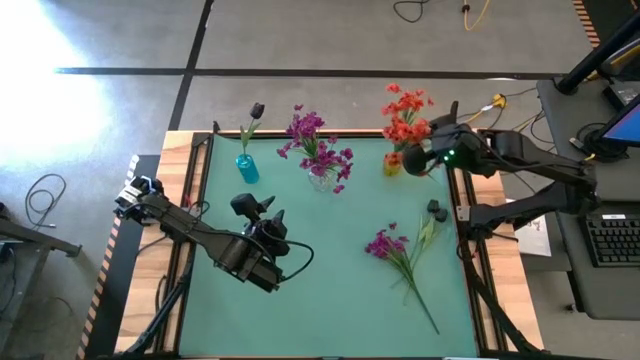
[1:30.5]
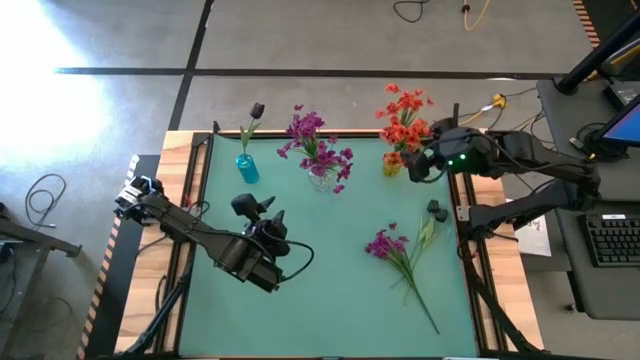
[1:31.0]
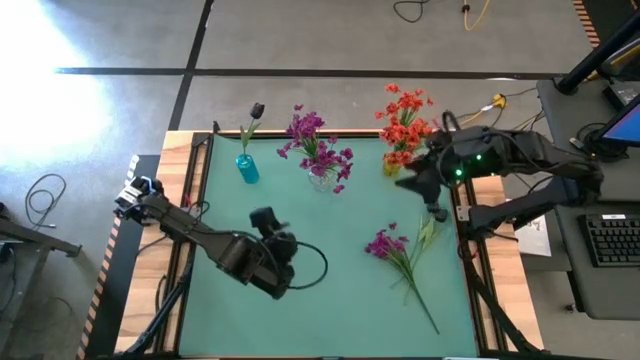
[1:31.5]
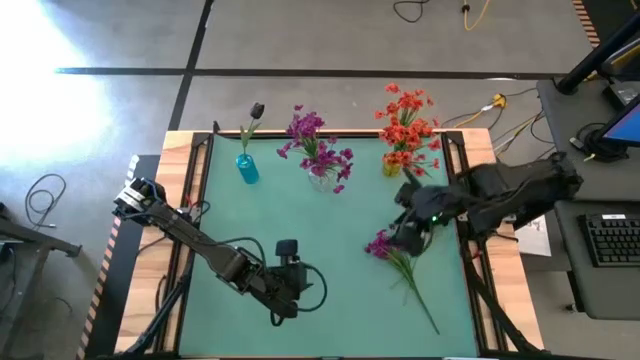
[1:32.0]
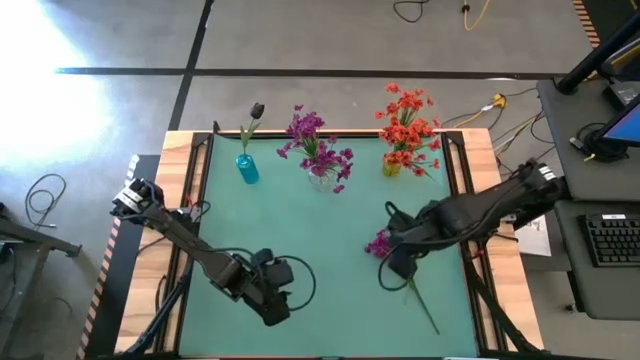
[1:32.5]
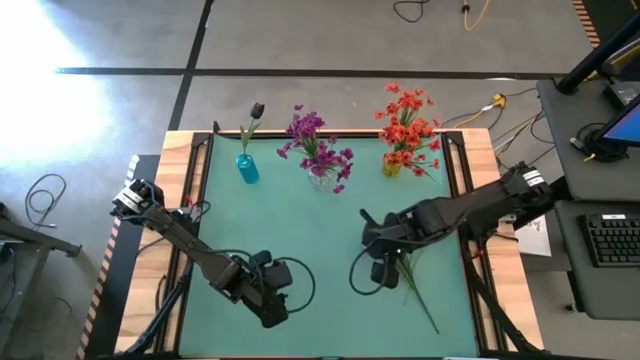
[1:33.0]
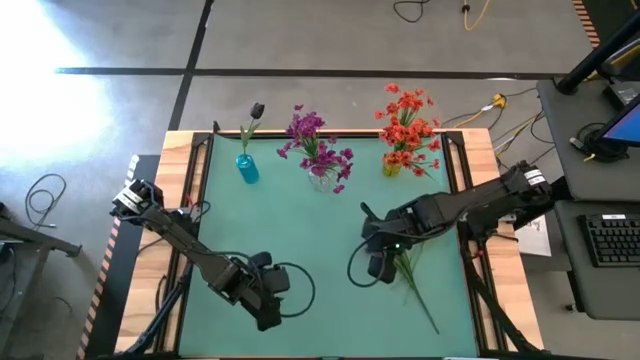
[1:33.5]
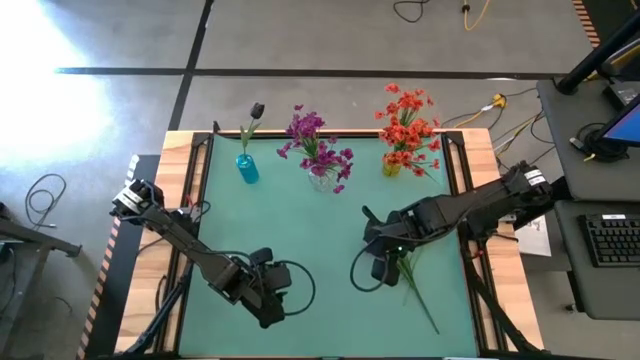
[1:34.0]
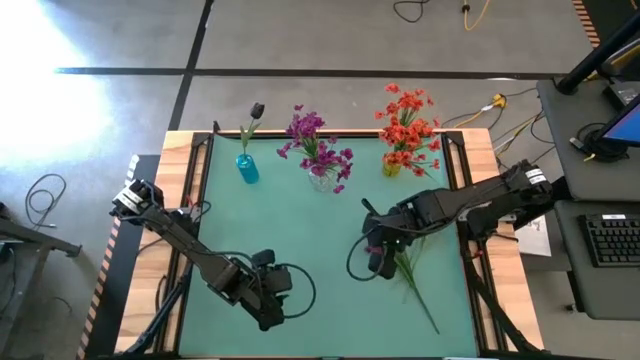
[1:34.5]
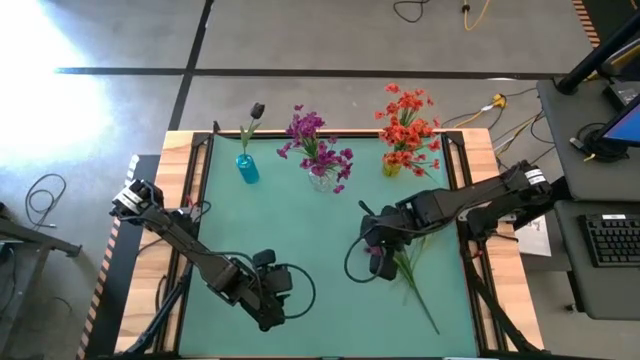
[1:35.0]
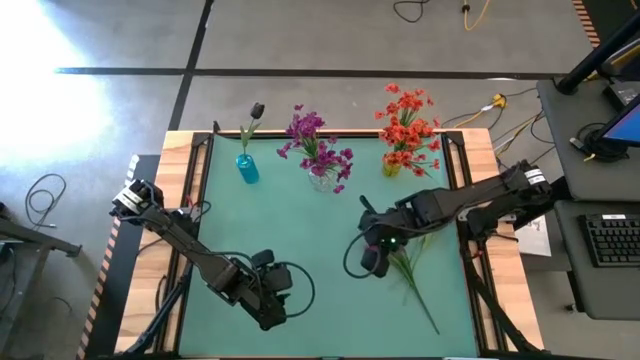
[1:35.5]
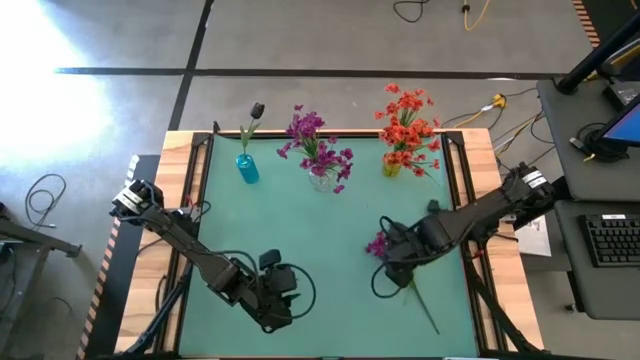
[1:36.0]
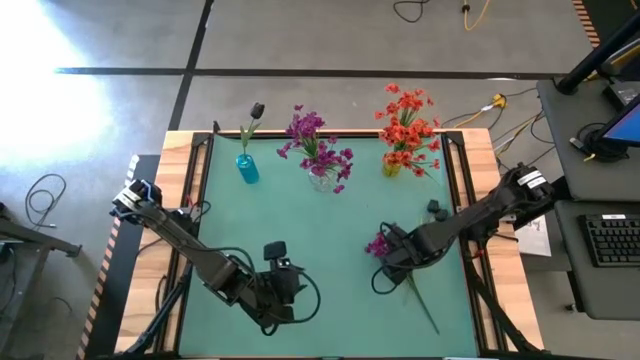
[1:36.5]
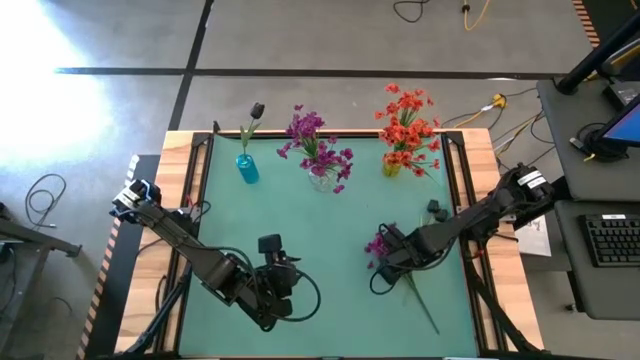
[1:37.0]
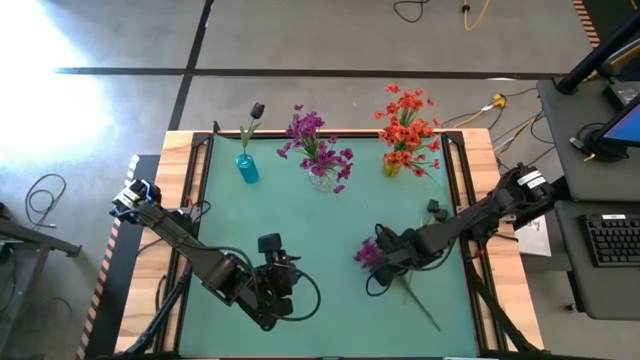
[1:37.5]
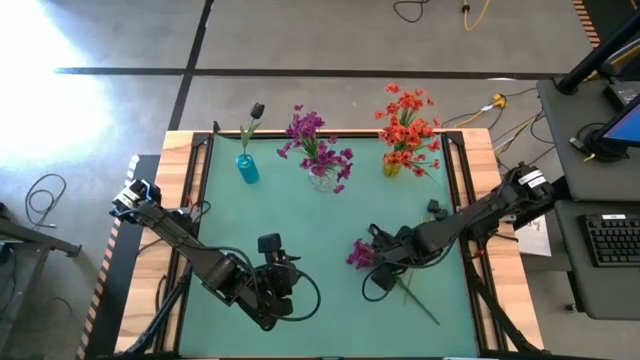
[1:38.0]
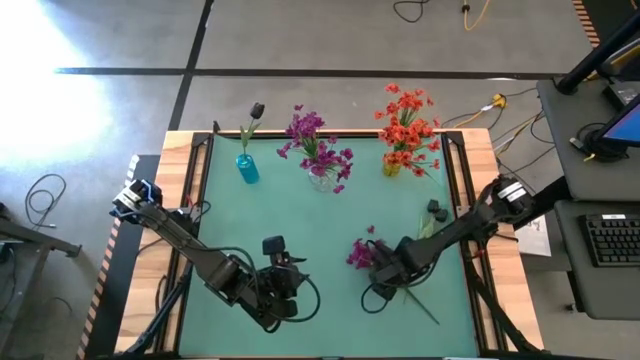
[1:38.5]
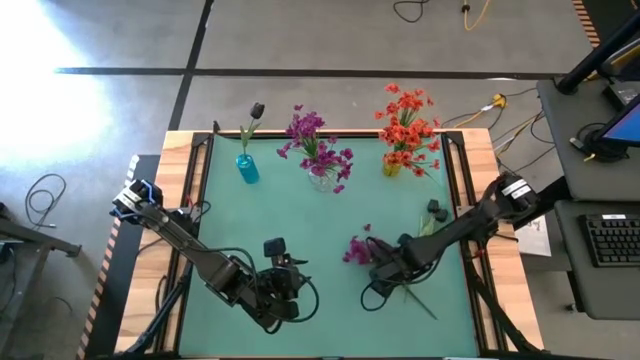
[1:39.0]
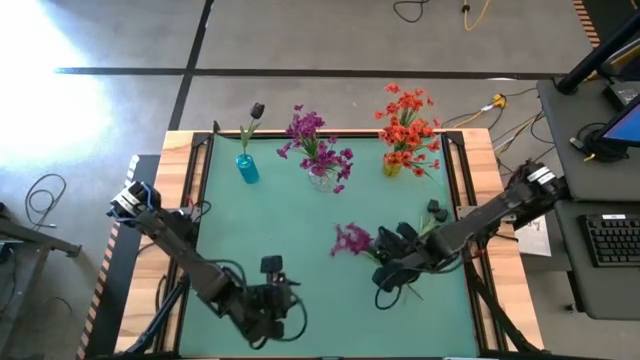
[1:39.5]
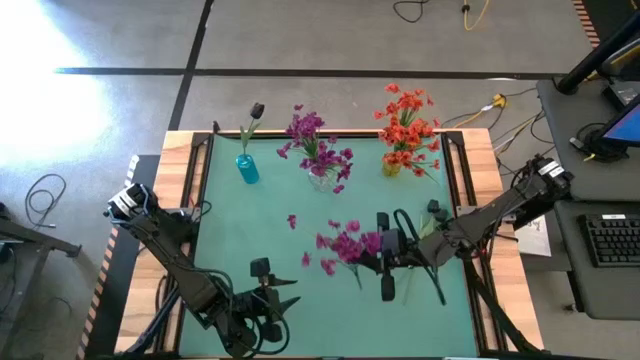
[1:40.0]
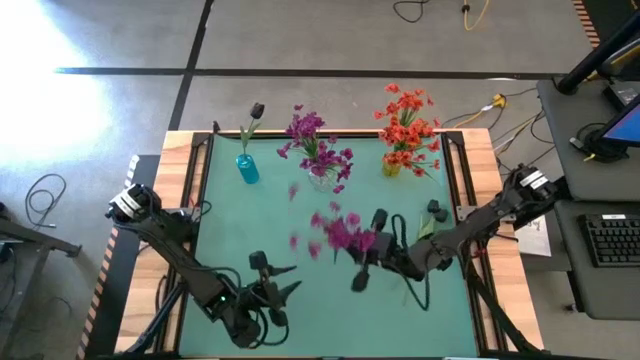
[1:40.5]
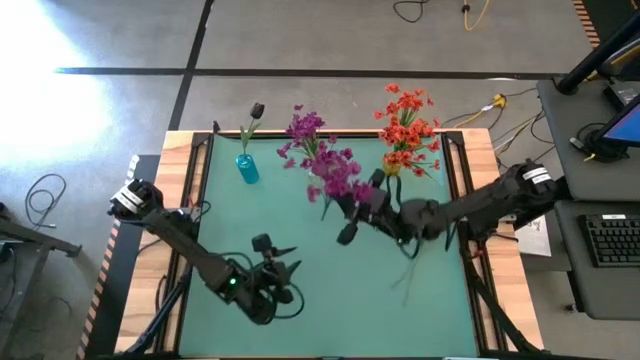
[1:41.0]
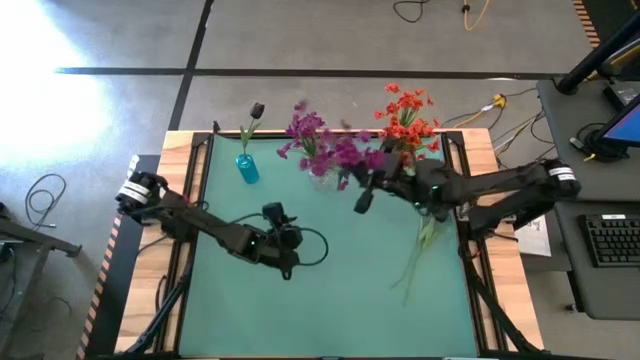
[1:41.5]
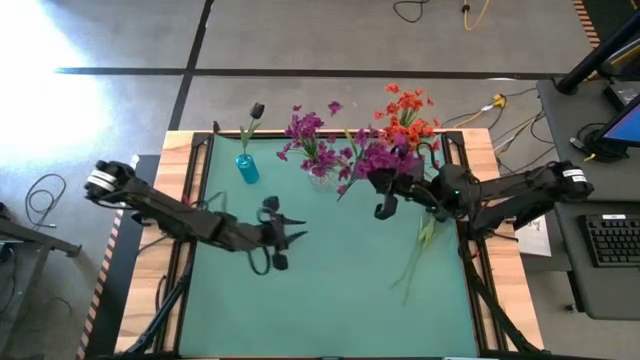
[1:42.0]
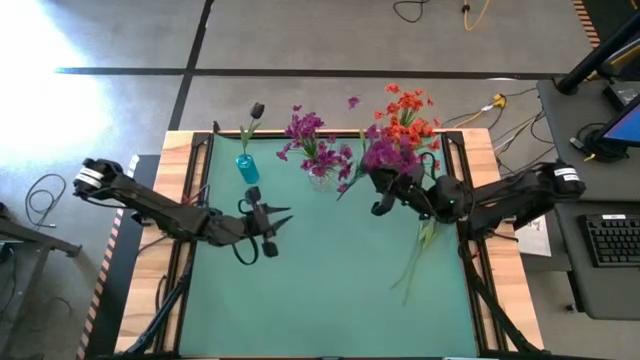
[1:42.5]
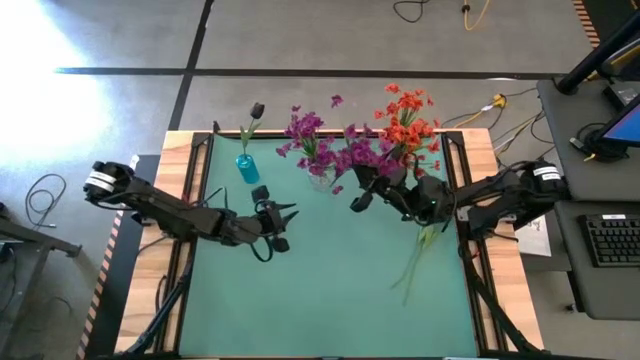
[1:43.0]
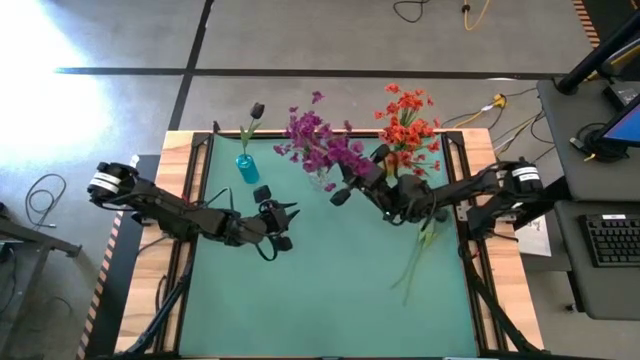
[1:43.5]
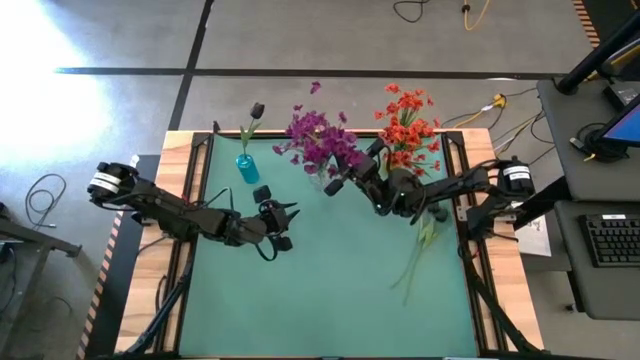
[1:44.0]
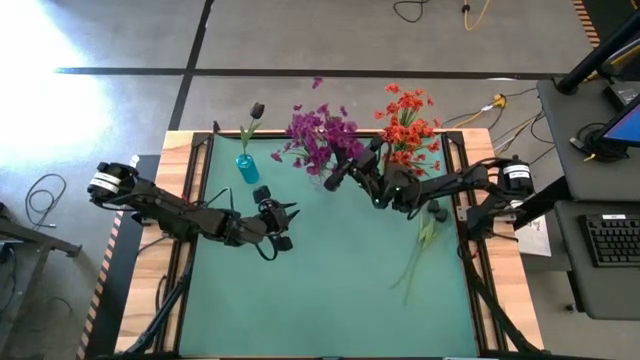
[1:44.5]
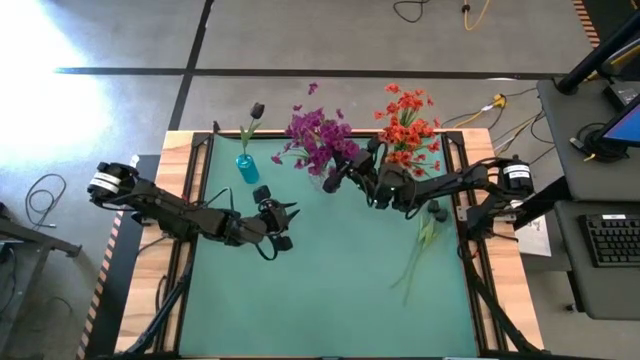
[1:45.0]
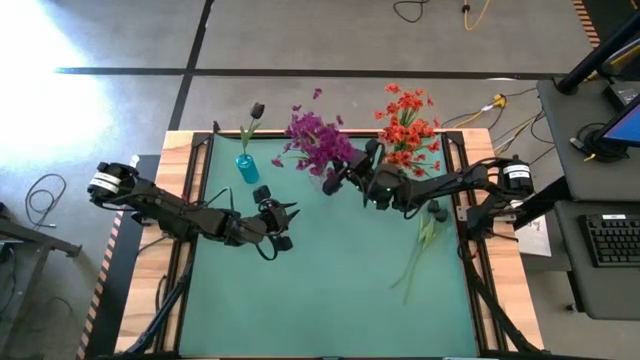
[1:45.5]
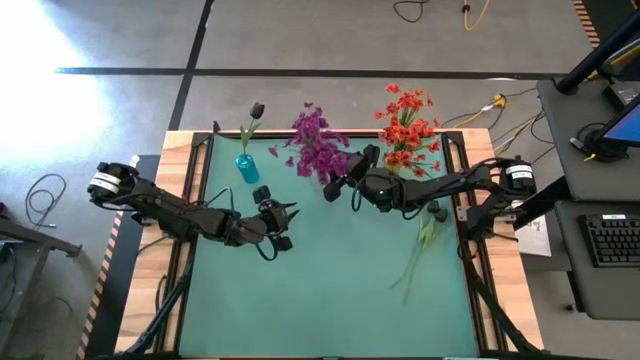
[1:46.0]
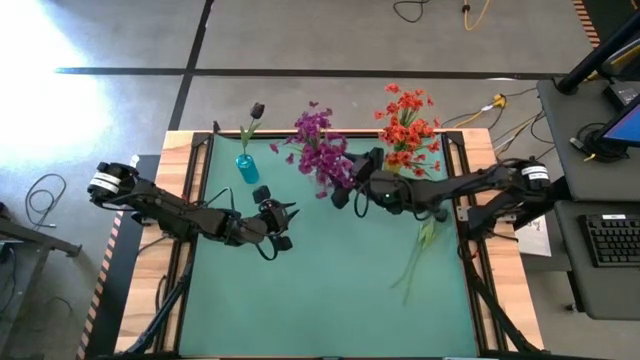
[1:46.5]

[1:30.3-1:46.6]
Task: Sort flowers into vase by color
Put the violet flowers into the transparent flower vase

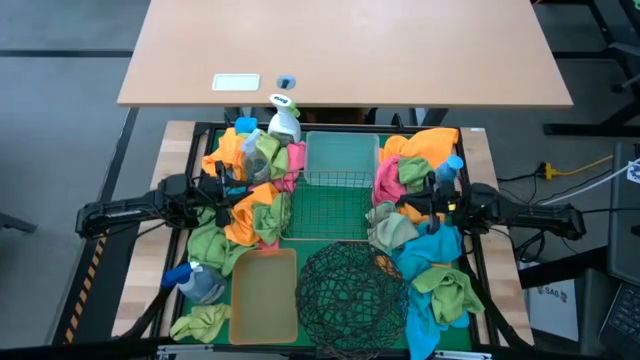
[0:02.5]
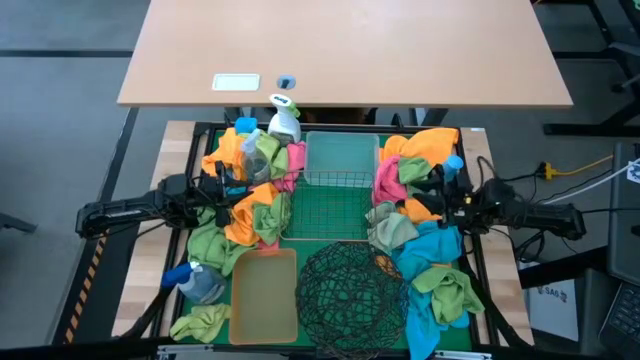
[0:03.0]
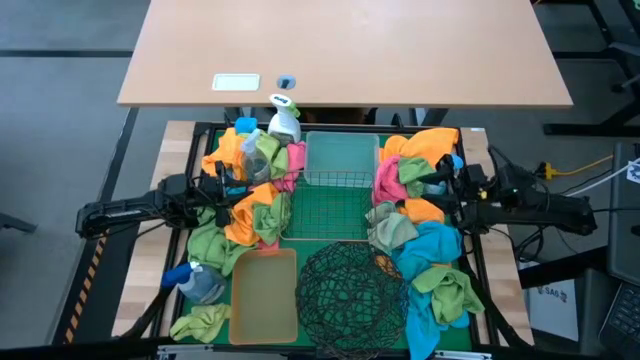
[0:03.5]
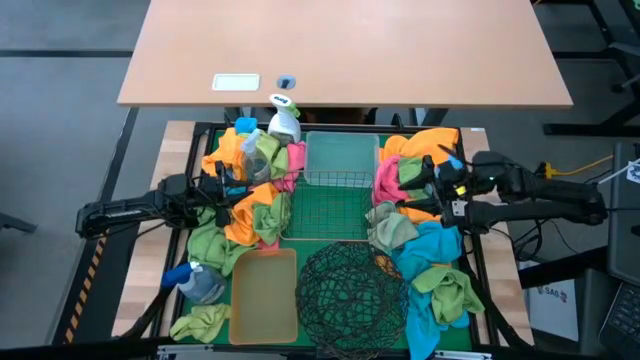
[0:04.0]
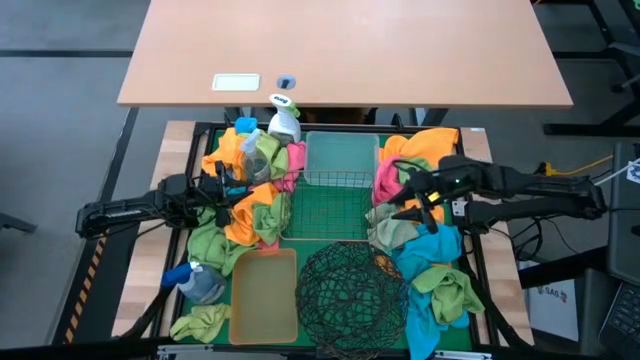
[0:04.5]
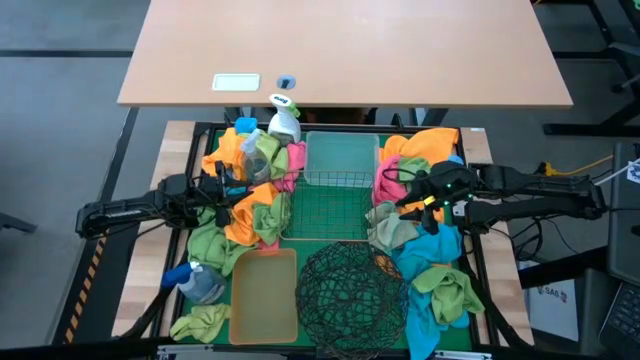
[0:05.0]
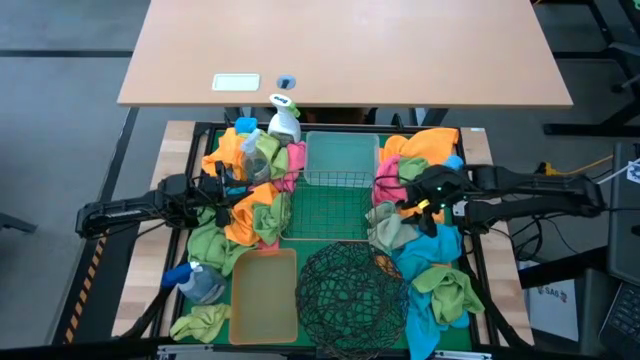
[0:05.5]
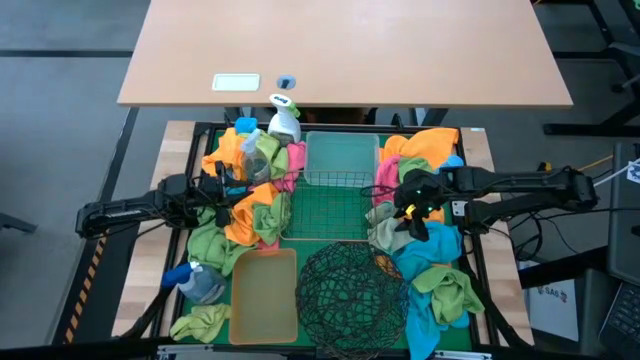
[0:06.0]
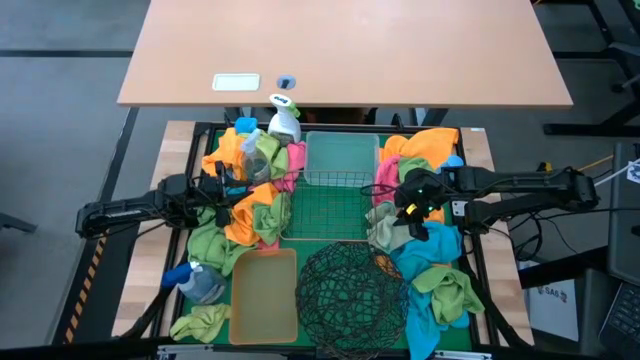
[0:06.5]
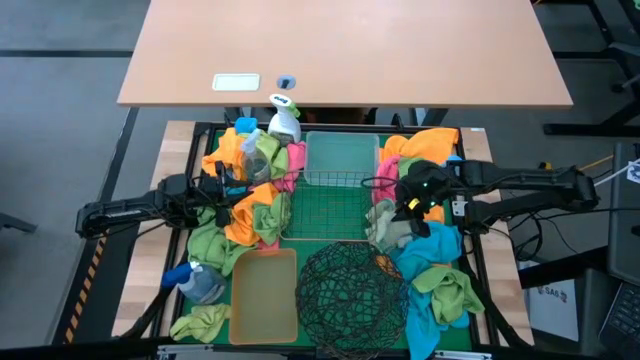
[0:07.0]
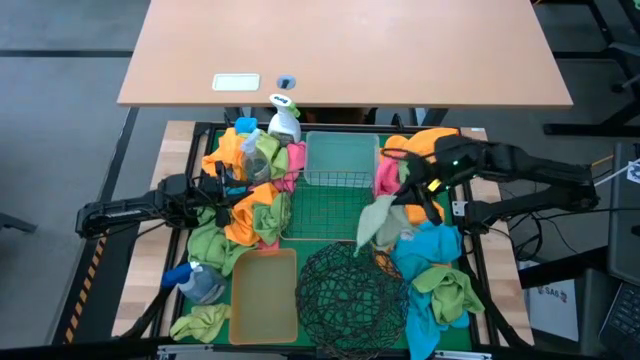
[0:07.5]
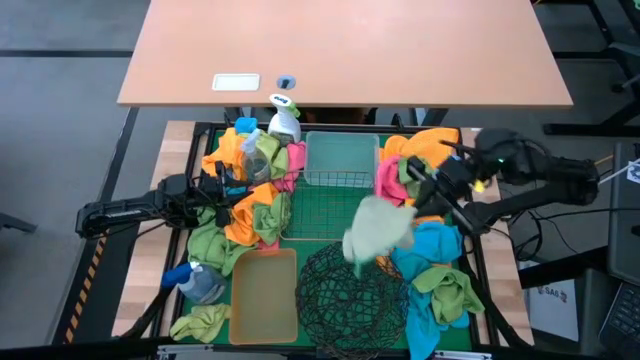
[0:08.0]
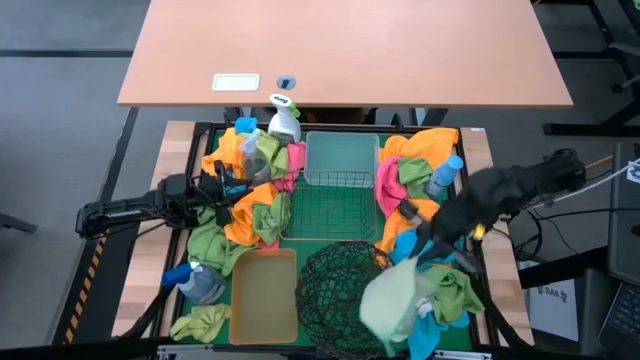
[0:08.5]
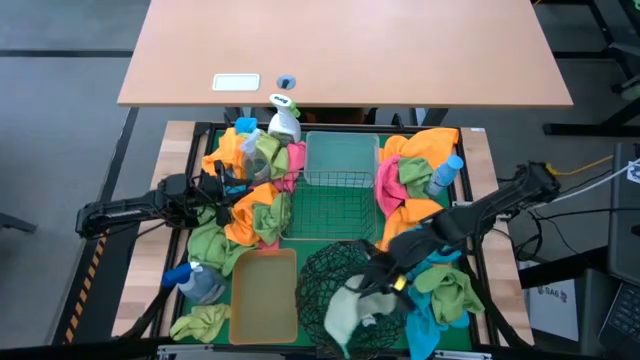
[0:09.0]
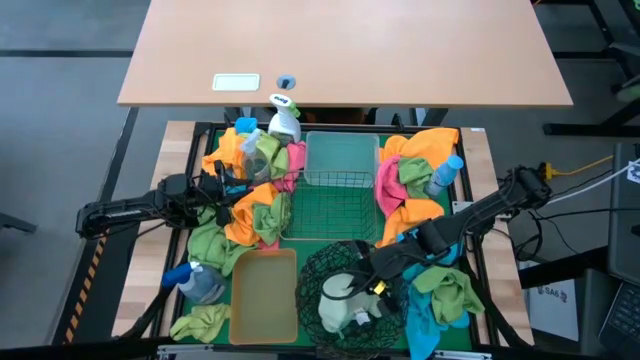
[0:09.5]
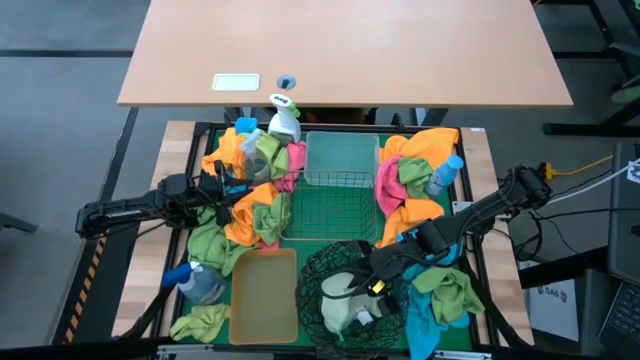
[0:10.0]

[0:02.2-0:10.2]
Task: Sort microfiber towel by color & place in baskets
Put the light green microfiber towel into the black wire basket
